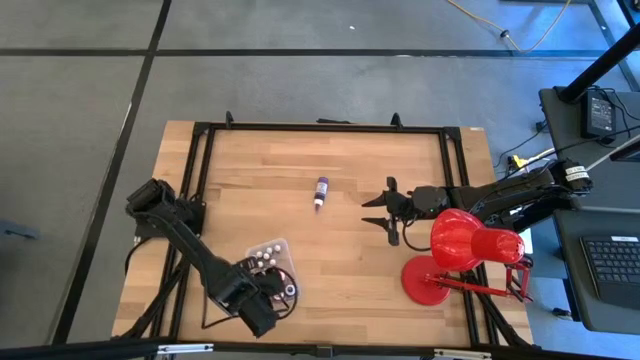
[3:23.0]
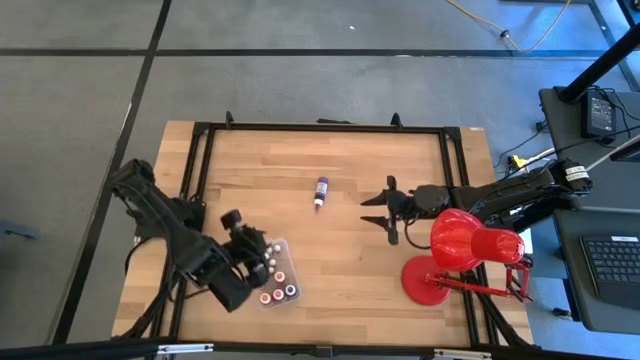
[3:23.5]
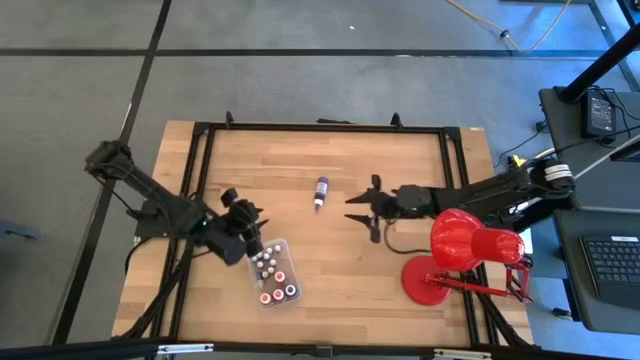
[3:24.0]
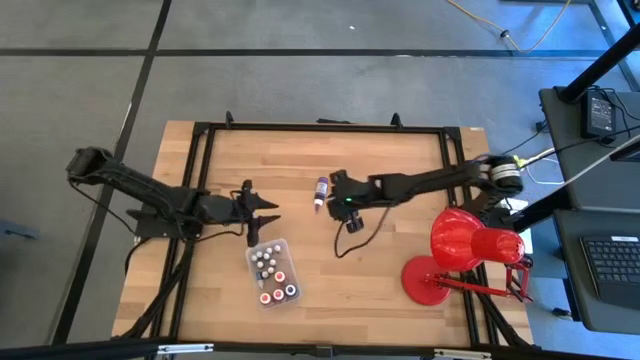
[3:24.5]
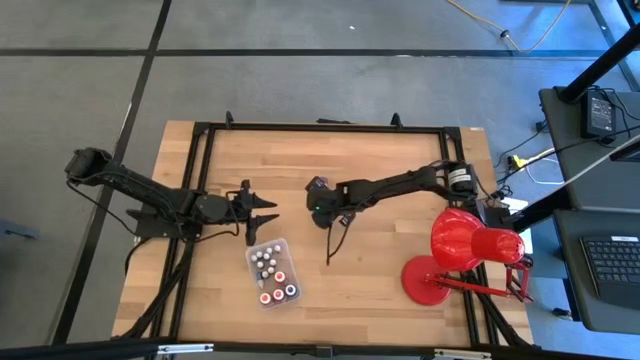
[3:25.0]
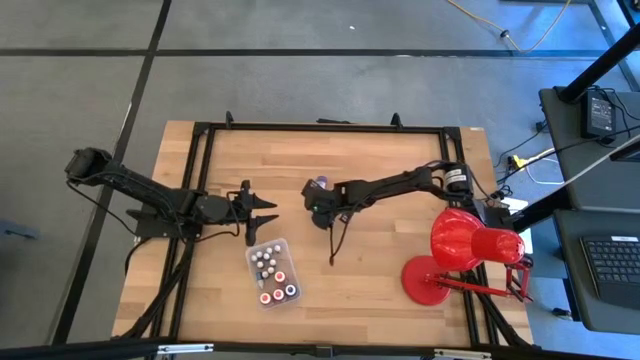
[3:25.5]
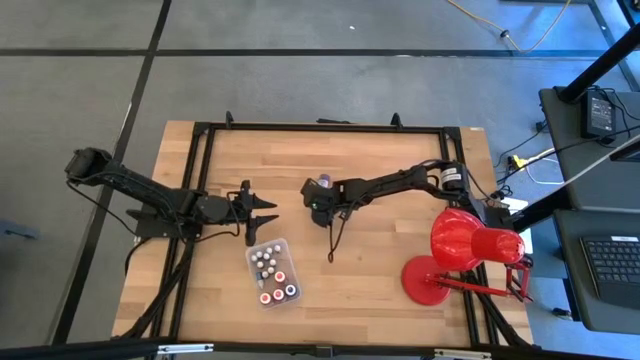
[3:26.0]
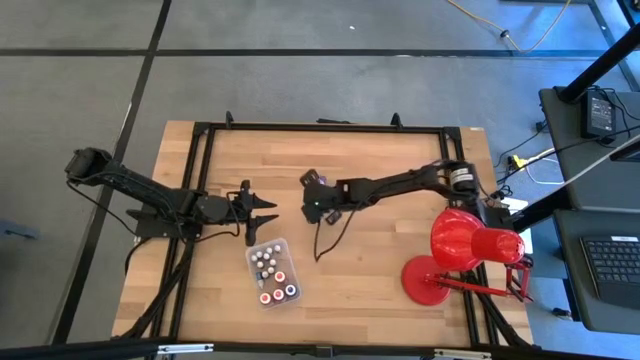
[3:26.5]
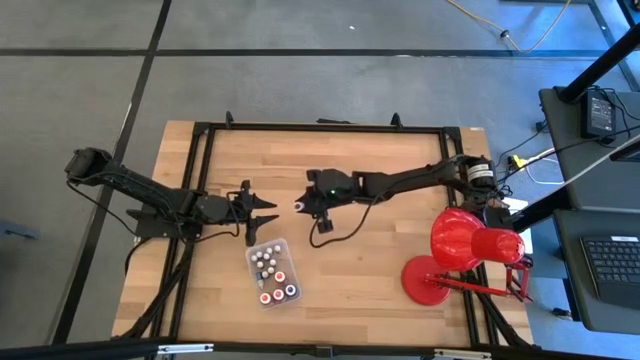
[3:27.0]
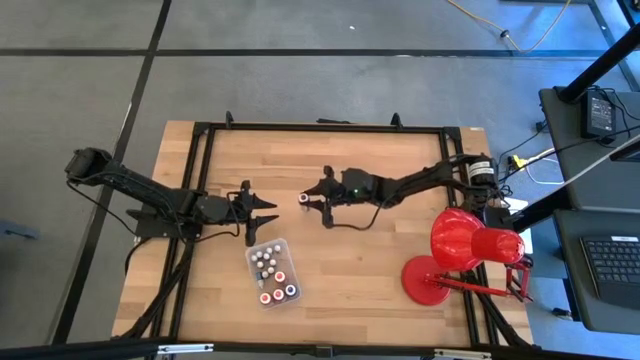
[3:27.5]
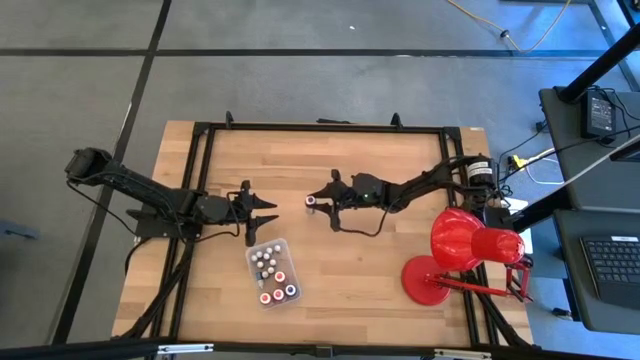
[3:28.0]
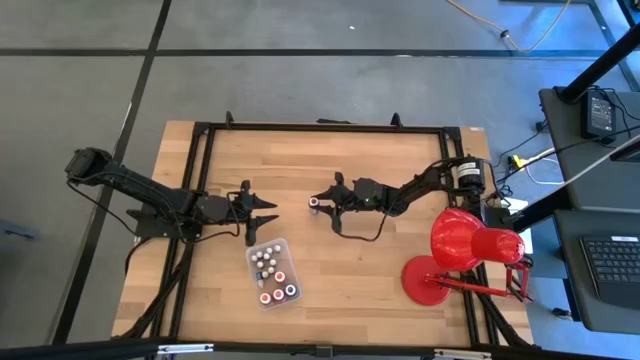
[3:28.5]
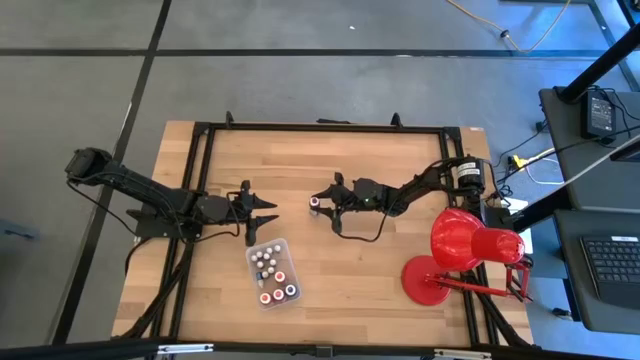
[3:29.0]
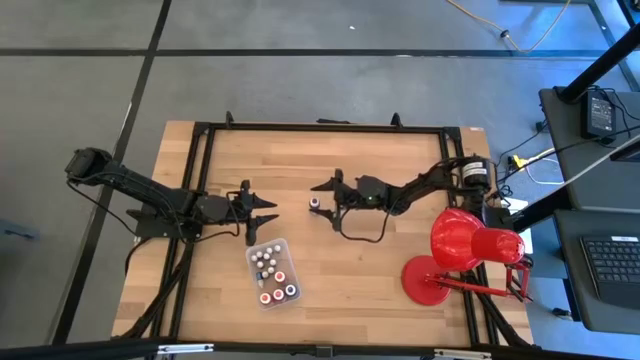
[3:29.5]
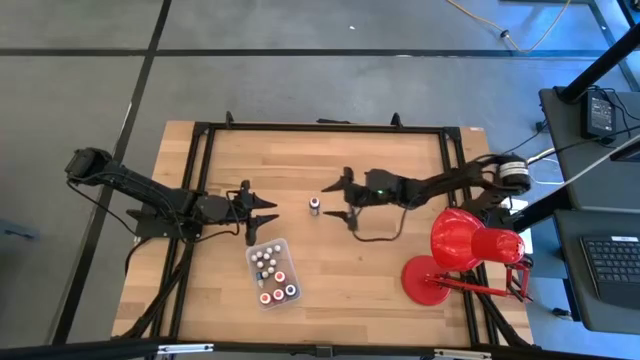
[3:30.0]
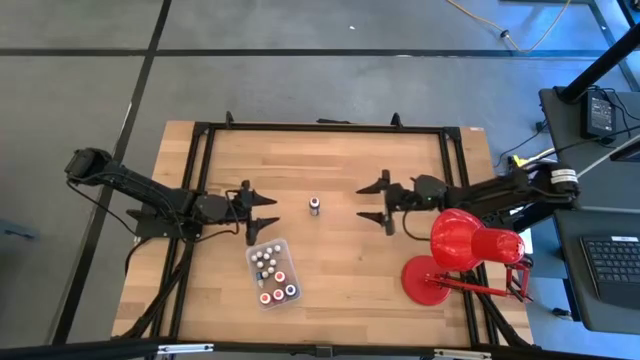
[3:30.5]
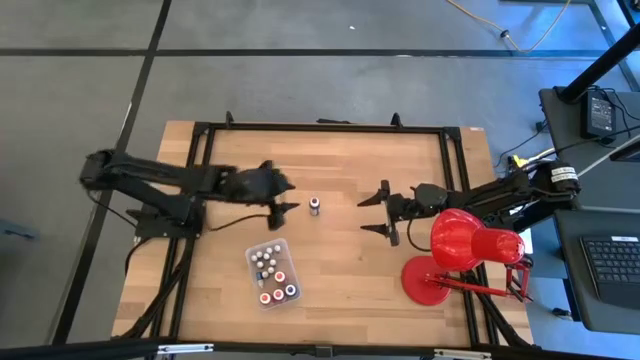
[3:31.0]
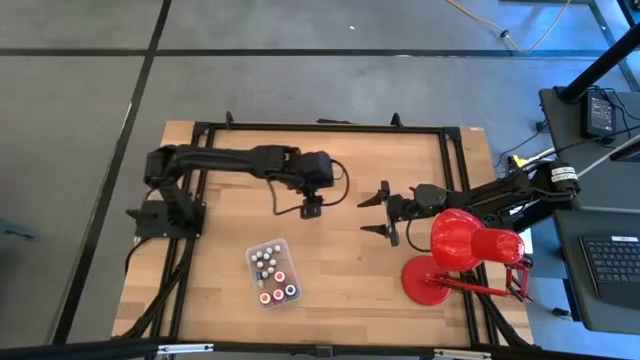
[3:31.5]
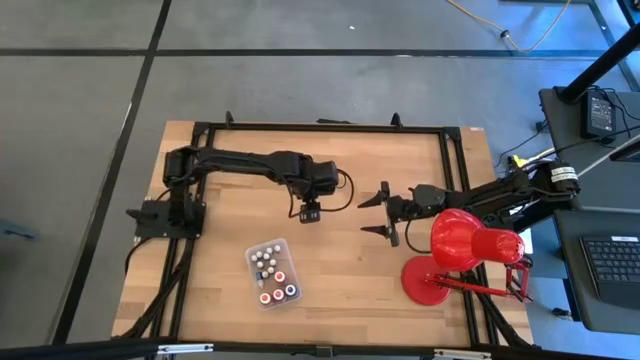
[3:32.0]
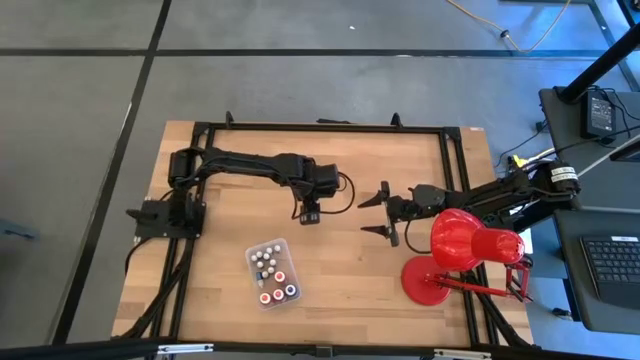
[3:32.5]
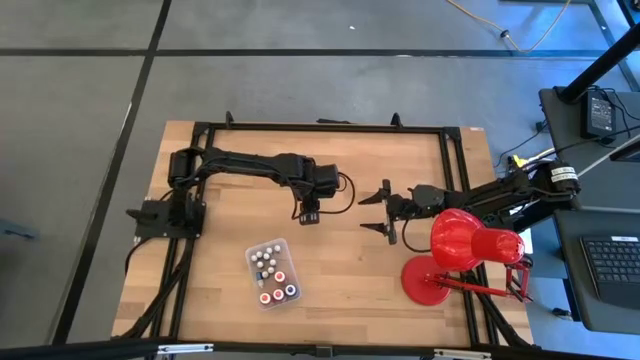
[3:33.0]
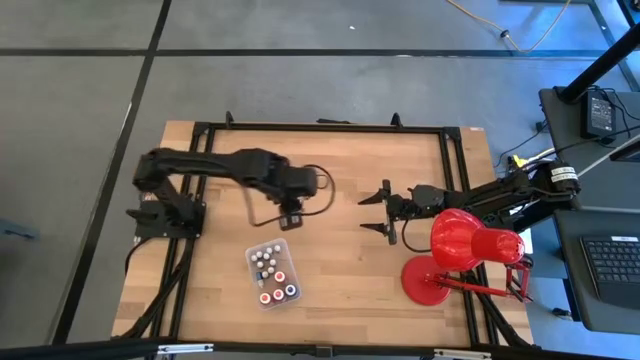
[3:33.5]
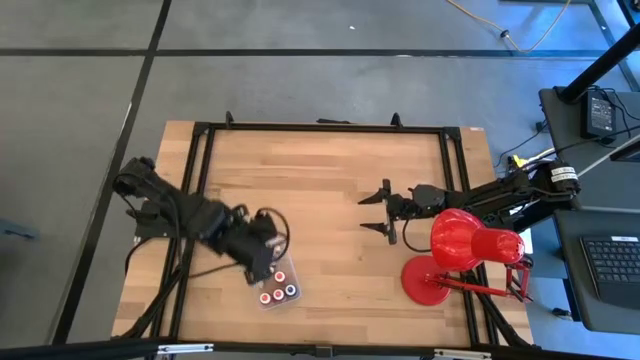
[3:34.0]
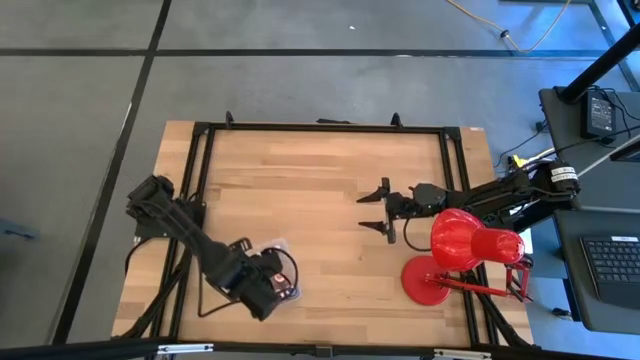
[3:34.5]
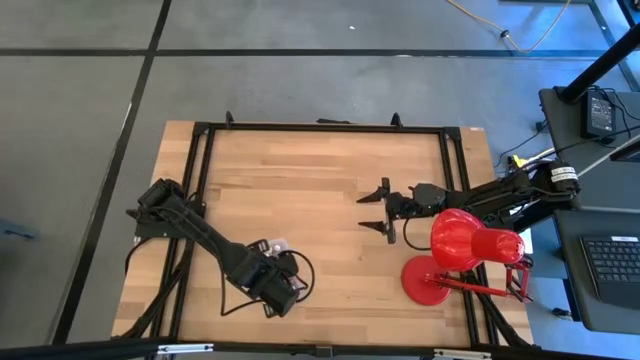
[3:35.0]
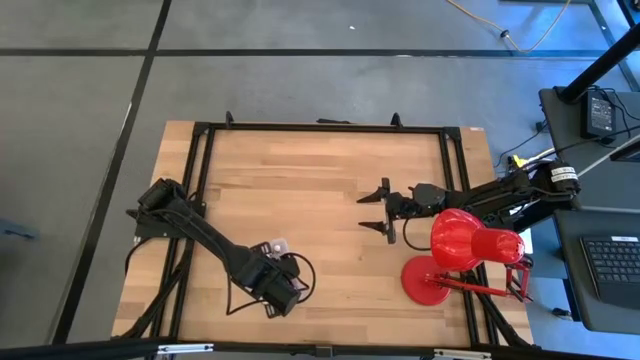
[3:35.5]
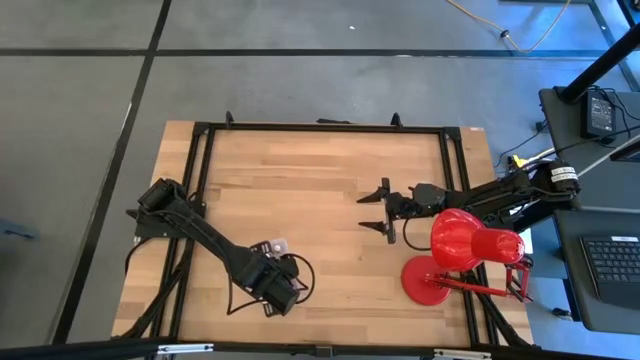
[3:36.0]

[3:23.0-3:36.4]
Task: Pick & Place food coloring
Put the purple food coloring bottle into the bin

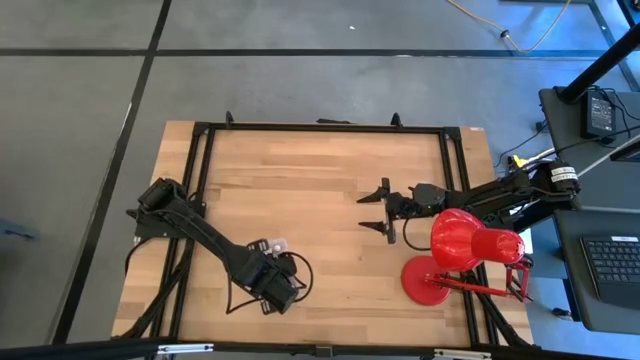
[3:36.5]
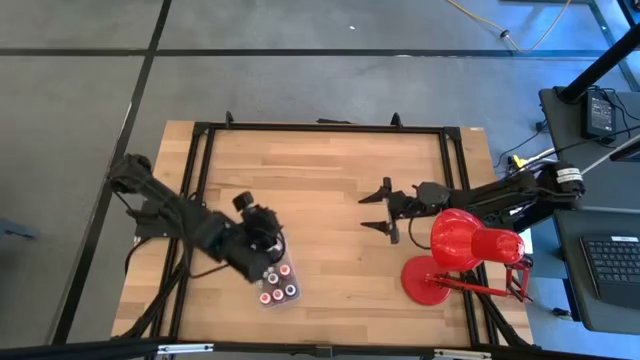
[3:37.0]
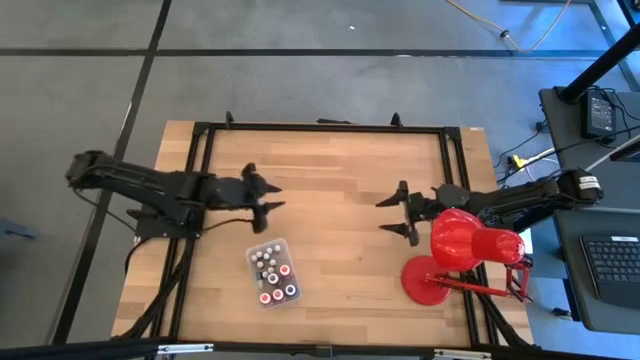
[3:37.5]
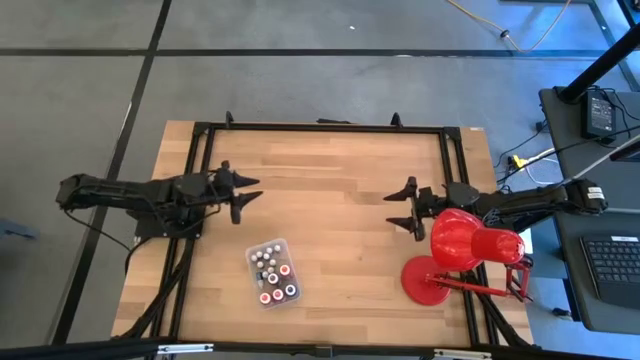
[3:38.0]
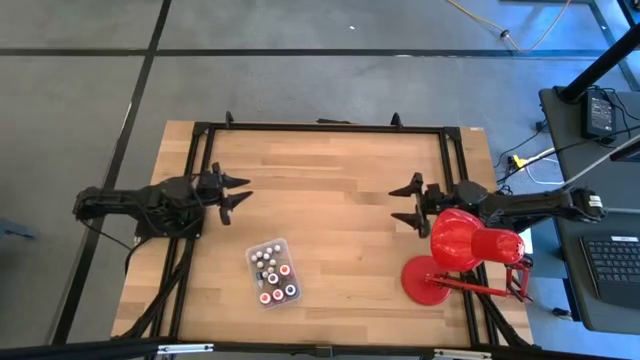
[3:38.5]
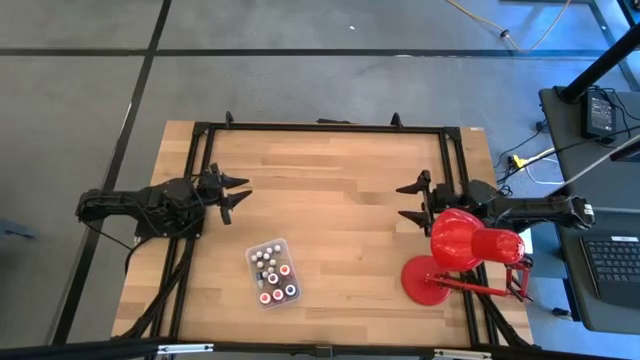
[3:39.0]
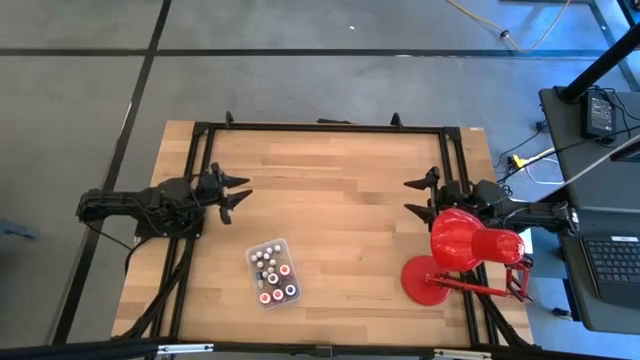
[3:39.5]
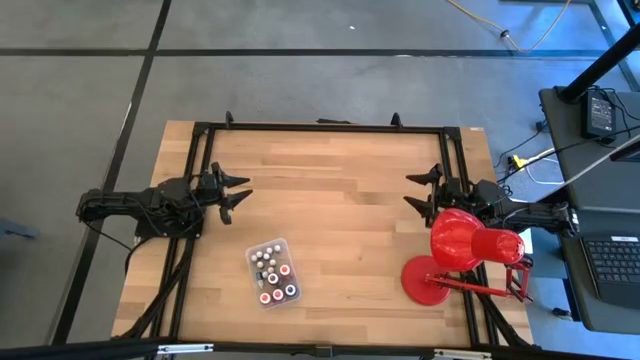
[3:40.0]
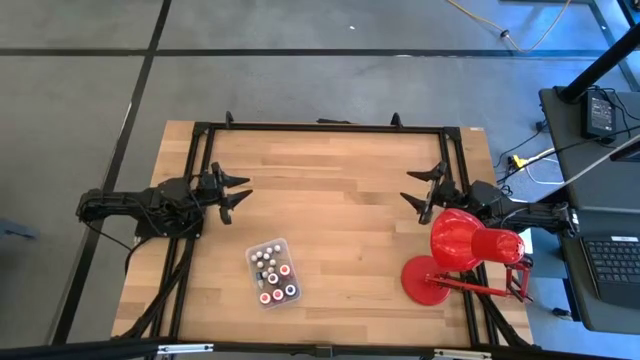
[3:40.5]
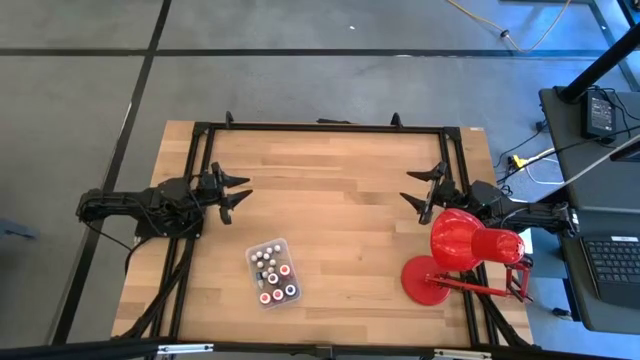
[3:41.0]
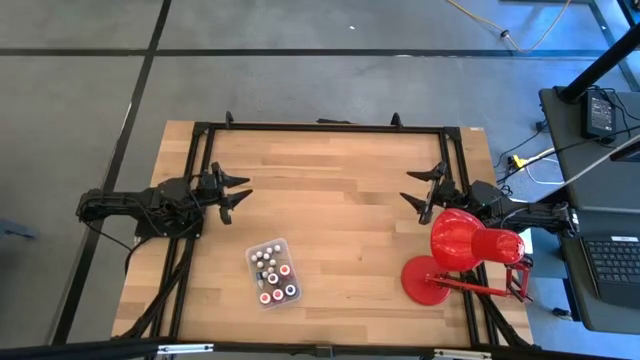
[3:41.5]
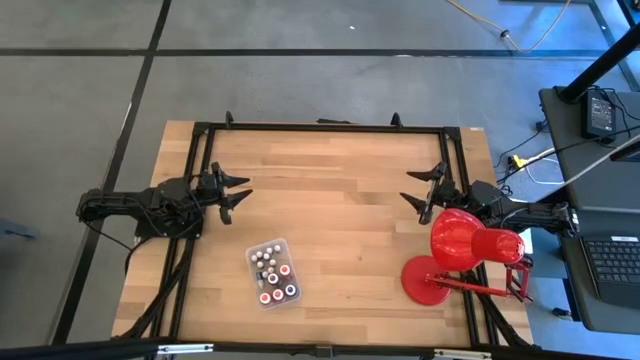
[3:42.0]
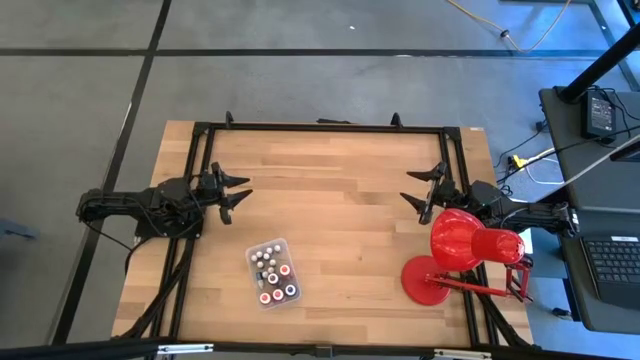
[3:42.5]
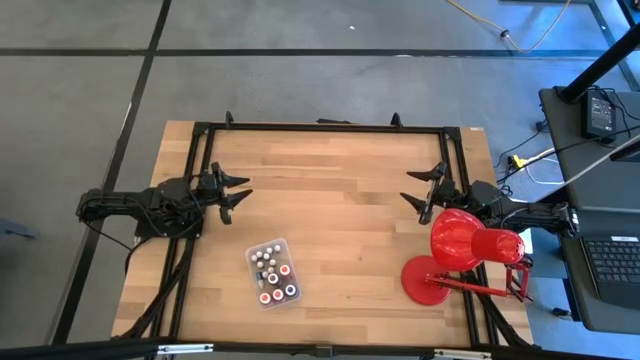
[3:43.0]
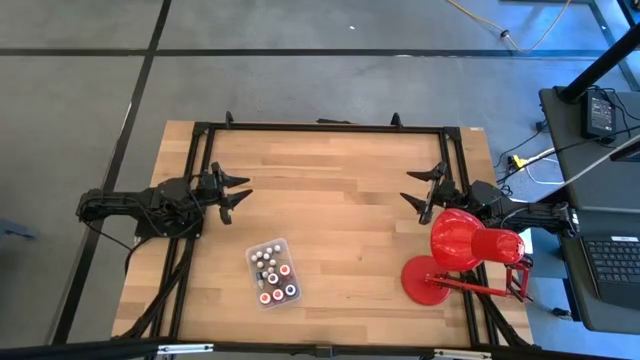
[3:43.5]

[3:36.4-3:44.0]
Return to Home Position
